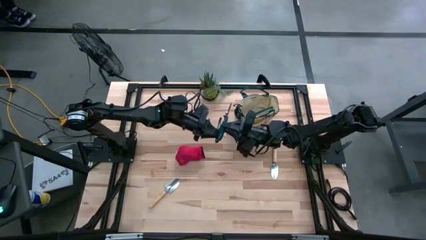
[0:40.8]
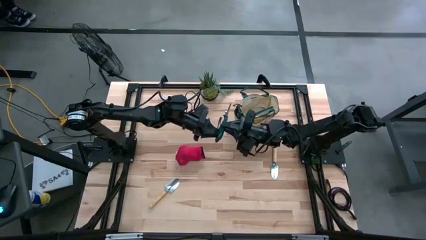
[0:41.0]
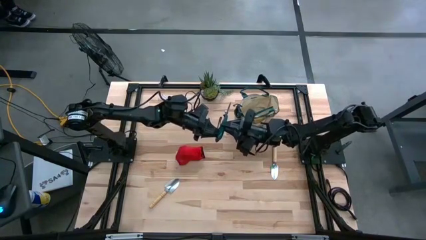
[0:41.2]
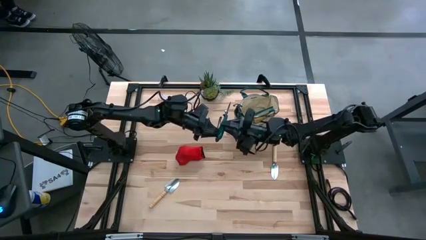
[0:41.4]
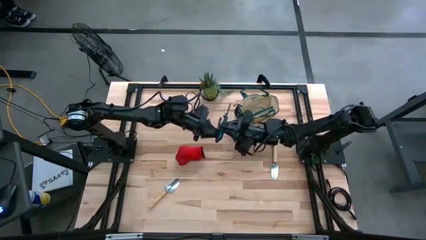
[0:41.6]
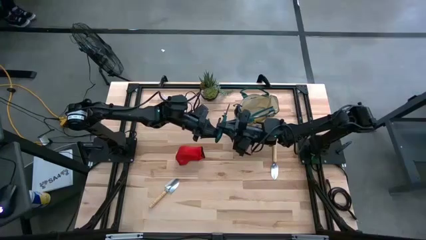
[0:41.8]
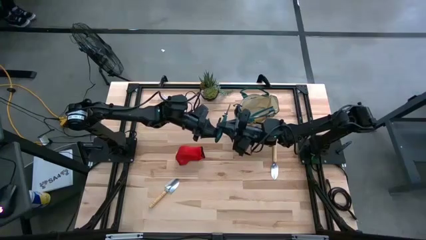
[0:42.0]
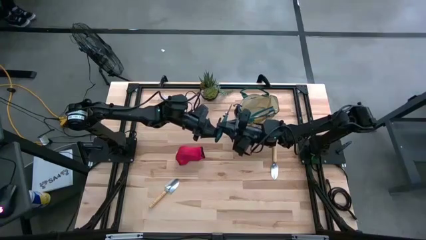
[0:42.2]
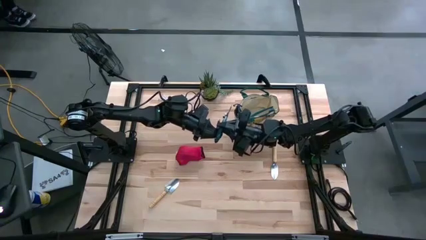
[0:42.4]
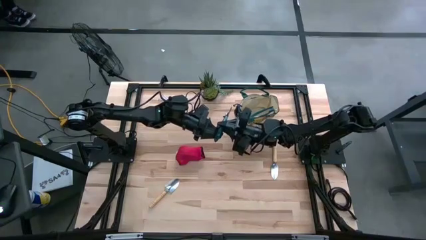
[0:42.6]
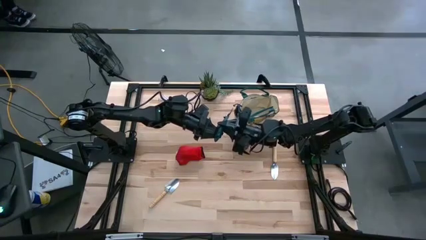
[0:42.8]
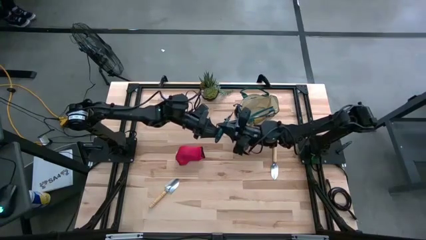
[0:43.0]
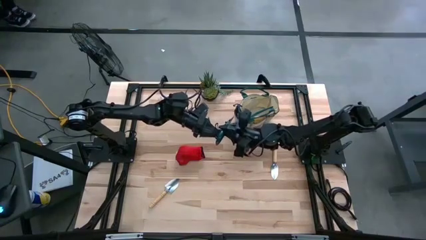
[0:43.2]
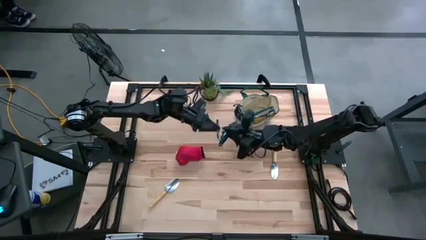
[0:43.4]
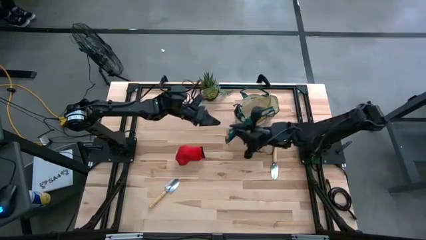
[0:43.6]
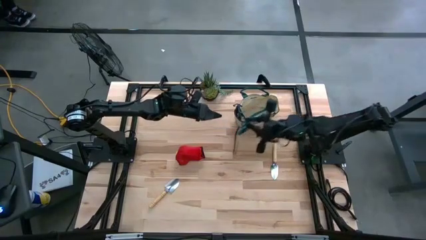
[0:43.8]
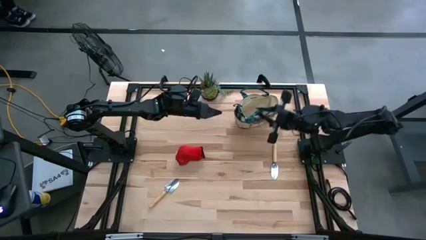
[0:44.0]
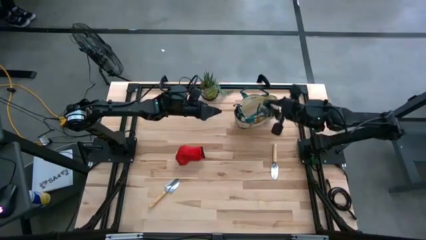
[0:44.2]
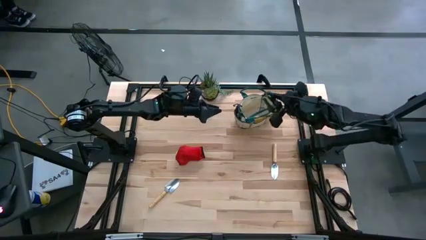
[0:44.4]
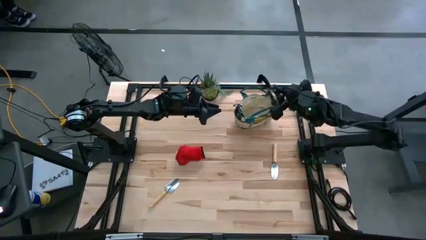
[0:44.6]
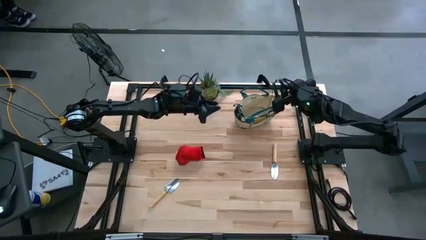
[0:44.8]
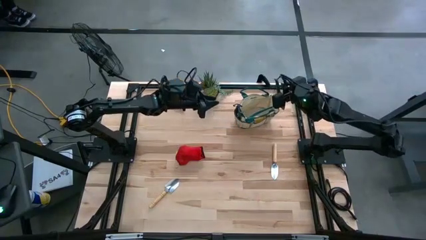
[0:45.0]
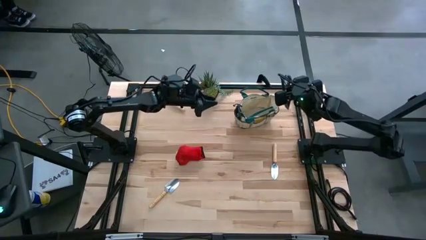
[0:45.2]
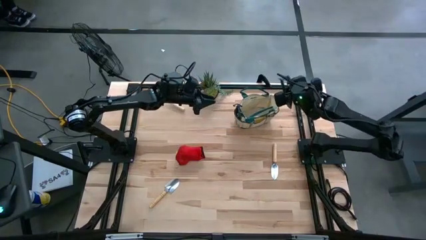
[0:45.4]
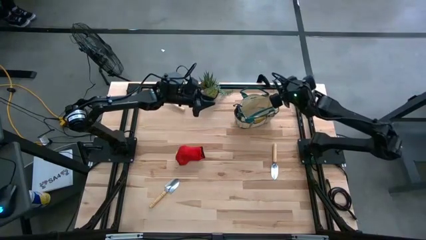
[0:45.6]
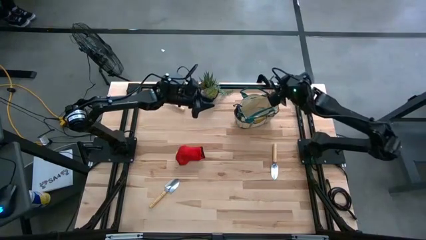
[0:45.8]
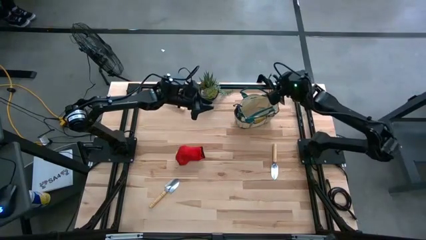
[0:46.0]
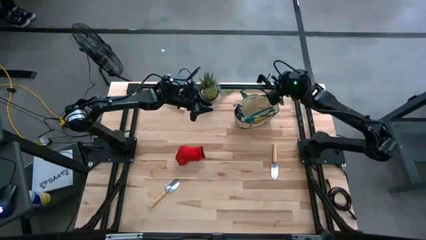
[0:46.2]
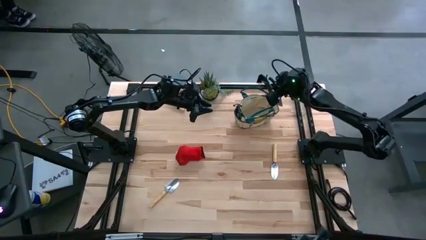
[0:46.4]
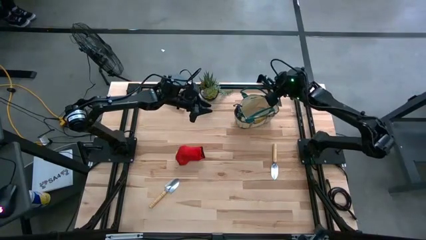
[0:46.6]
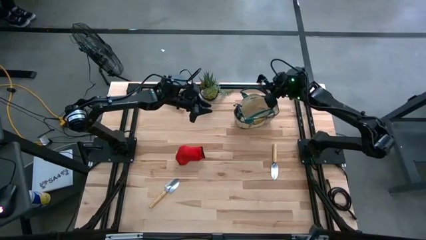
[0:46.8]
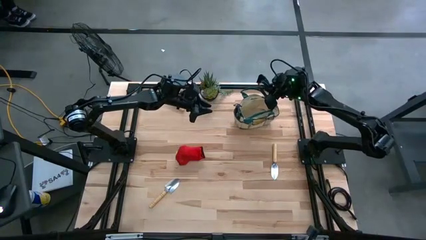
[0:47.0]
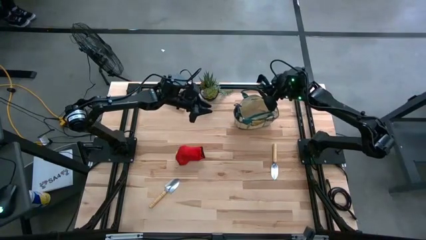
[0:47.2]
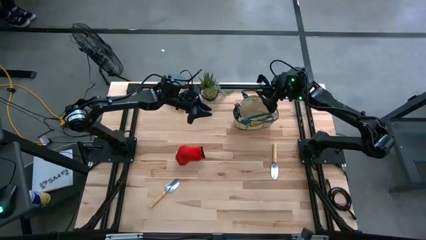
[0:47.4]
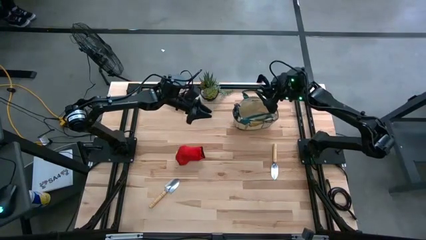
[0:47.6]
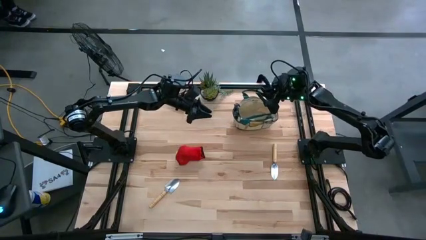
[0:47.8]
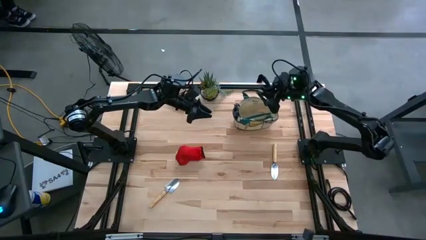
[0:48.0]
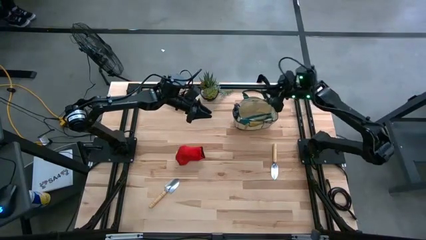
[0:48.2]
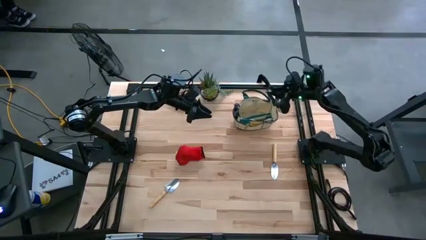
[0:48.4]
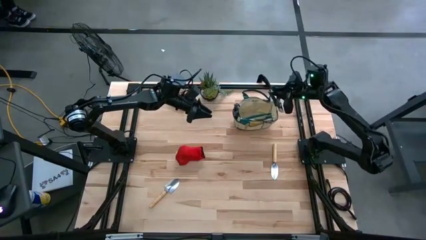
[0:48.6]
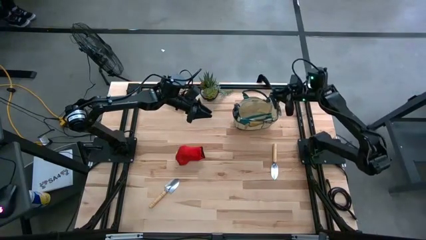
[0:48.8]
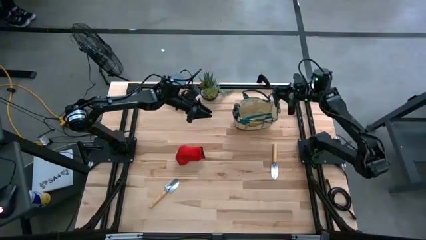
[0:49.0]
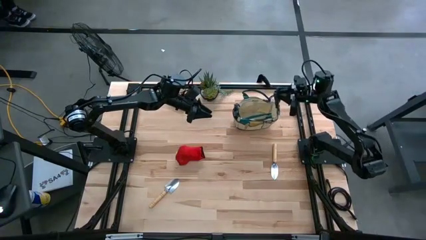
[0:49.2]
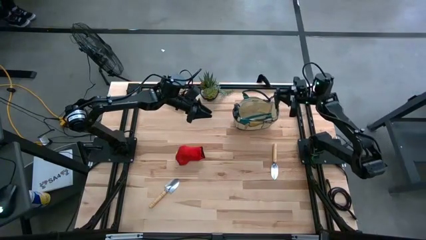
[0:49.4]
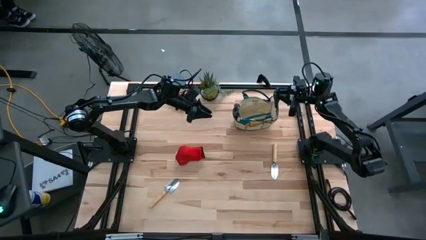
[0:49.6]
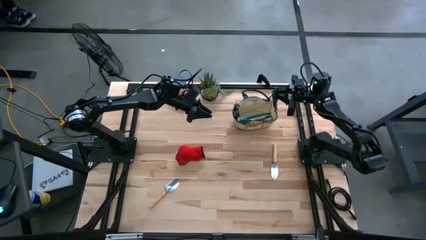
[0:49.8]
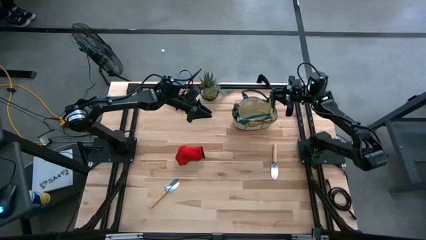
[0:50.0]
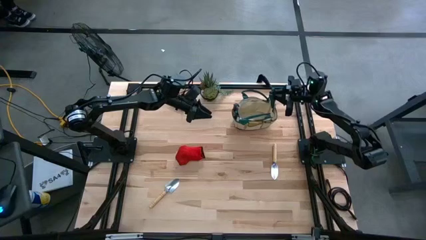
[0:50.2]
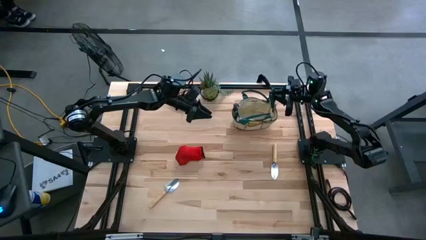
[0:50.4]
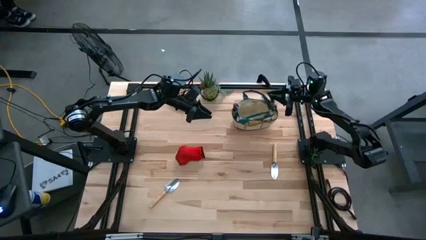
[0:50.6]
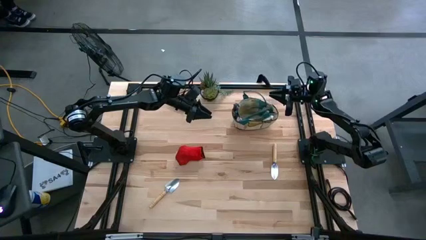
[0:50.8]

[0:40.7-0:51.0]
Task: Pick & Place Garden tools in Gardening bag
Put the green shear scissors into the light brown gardening bag
